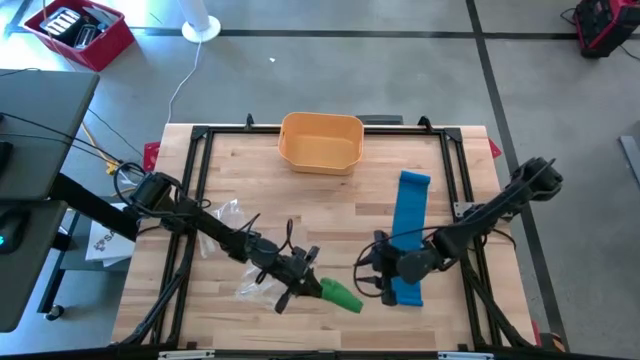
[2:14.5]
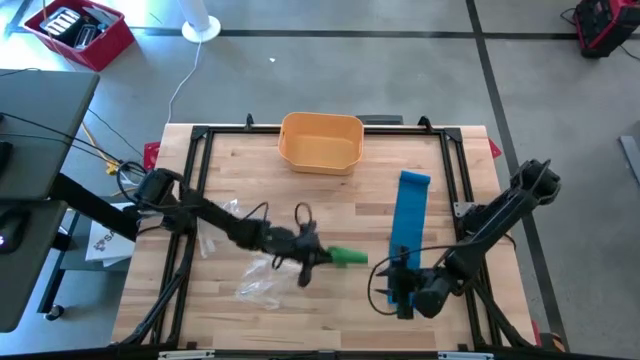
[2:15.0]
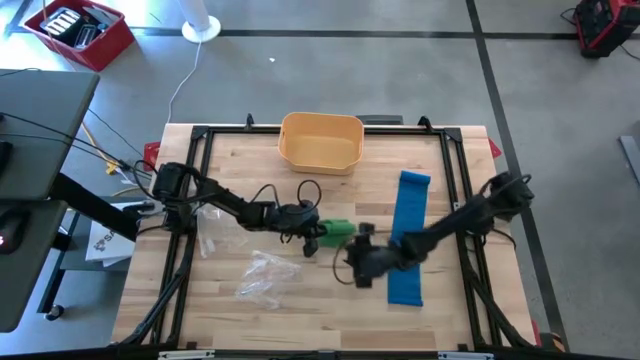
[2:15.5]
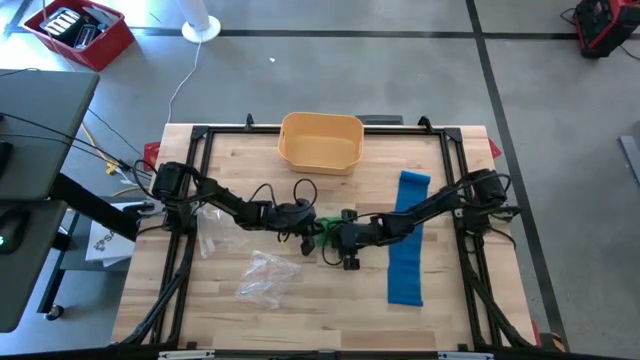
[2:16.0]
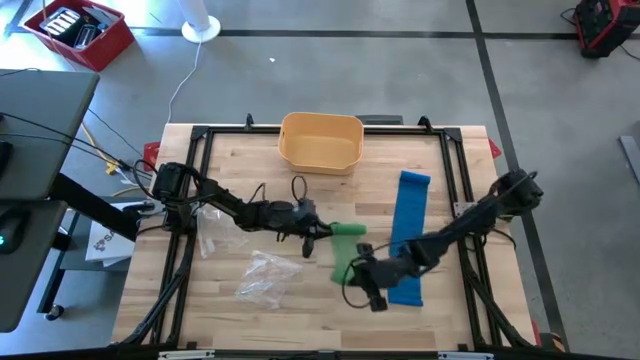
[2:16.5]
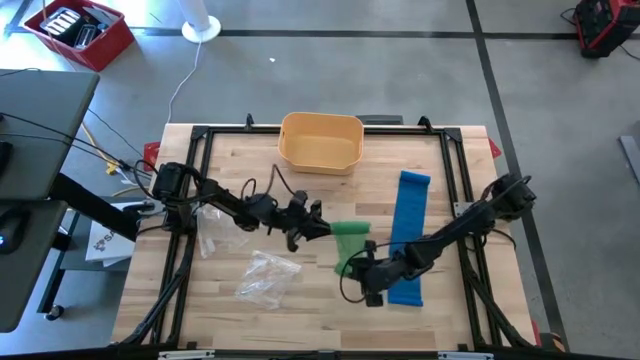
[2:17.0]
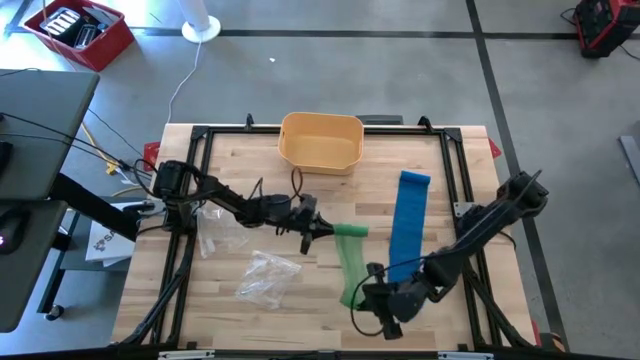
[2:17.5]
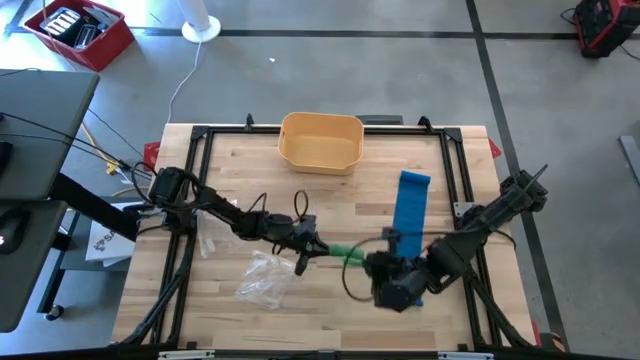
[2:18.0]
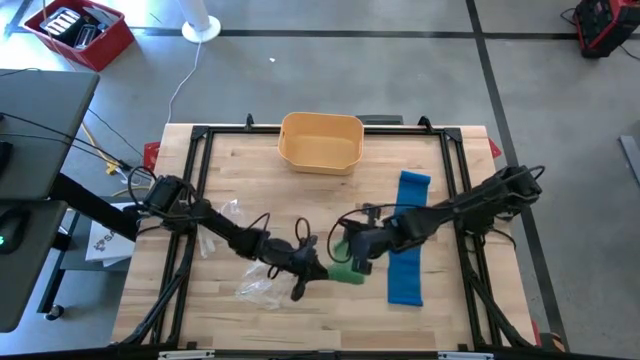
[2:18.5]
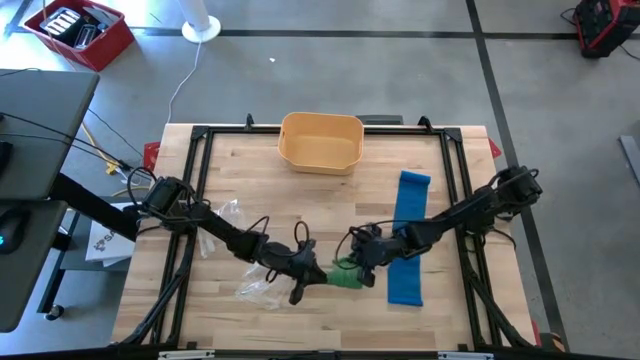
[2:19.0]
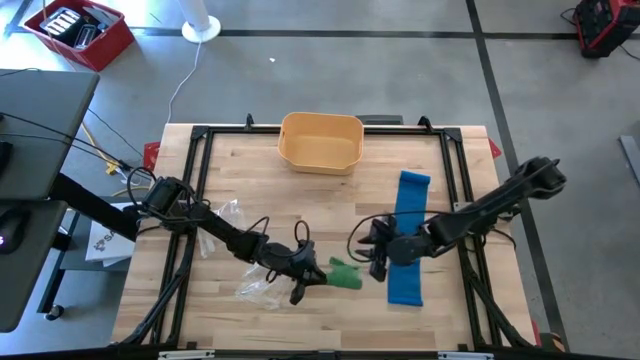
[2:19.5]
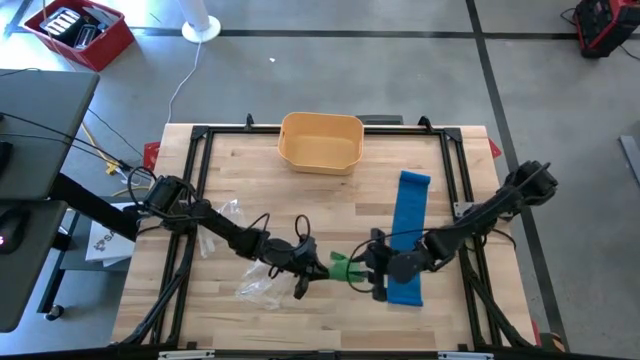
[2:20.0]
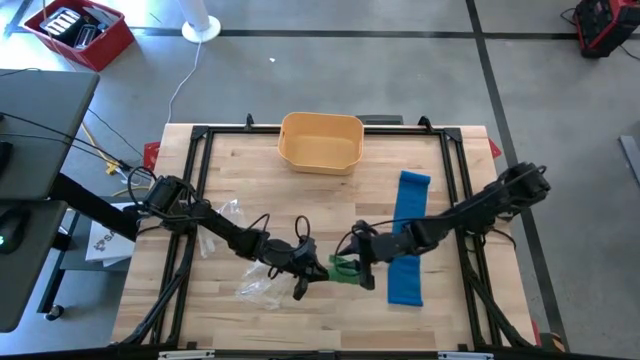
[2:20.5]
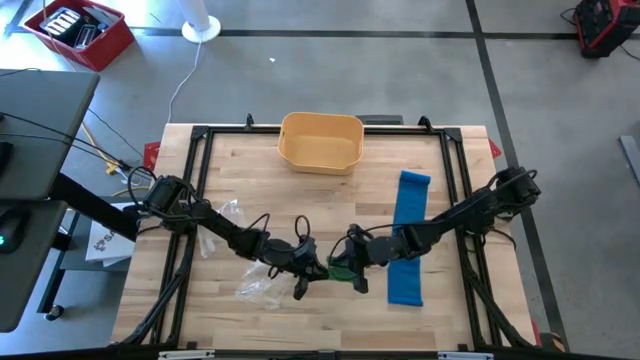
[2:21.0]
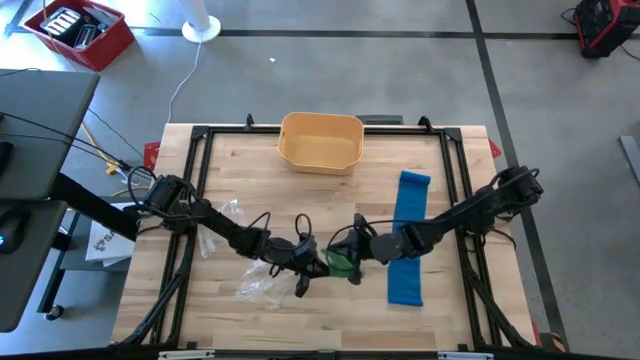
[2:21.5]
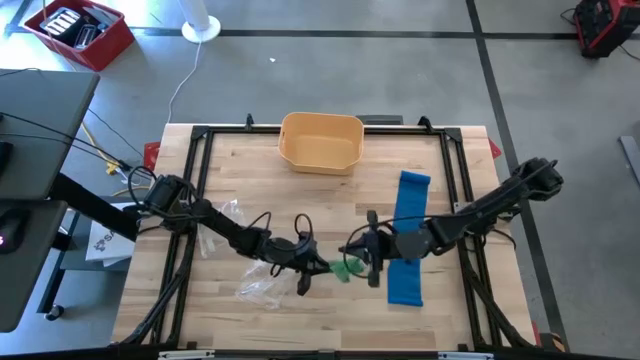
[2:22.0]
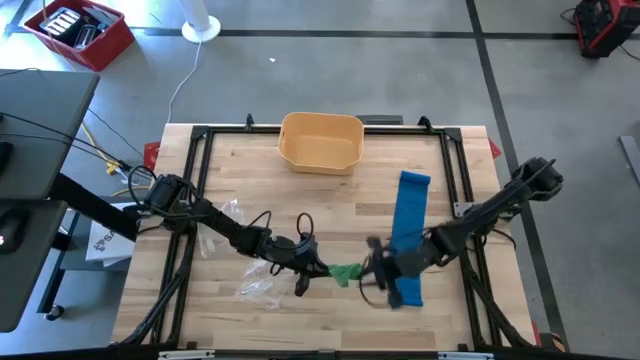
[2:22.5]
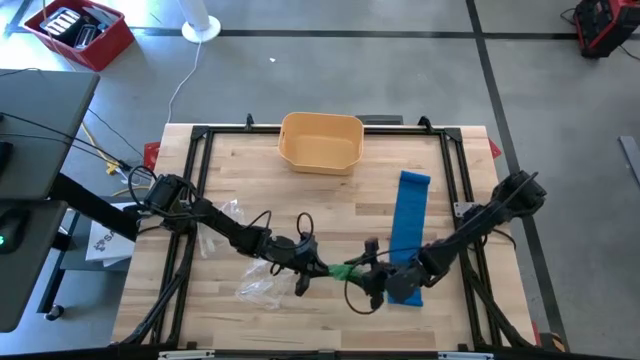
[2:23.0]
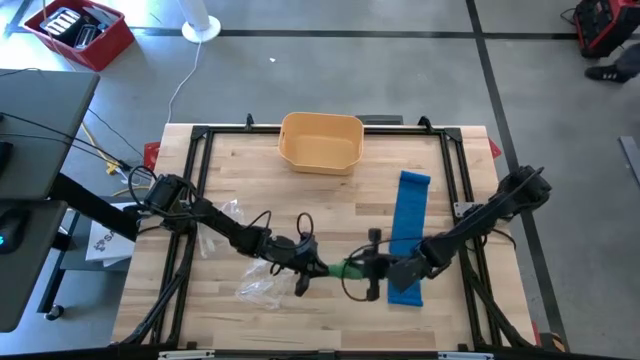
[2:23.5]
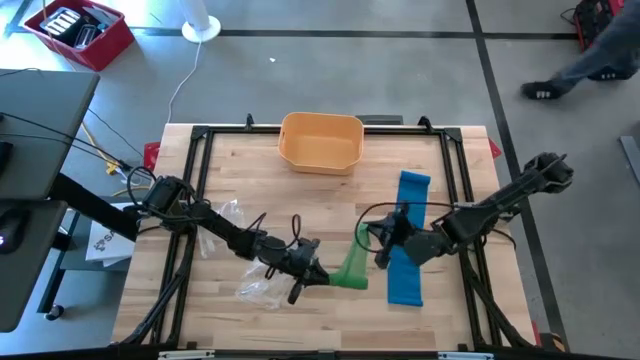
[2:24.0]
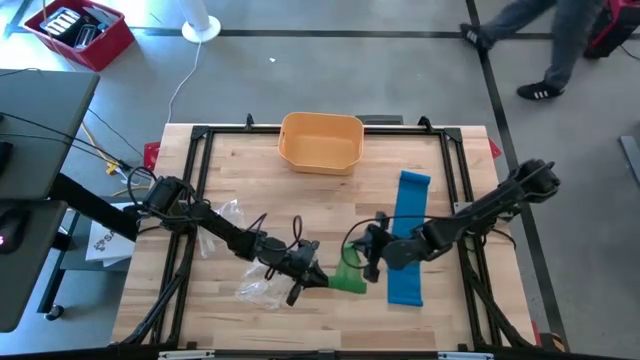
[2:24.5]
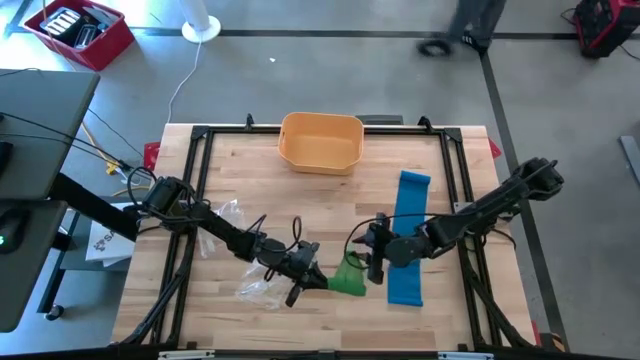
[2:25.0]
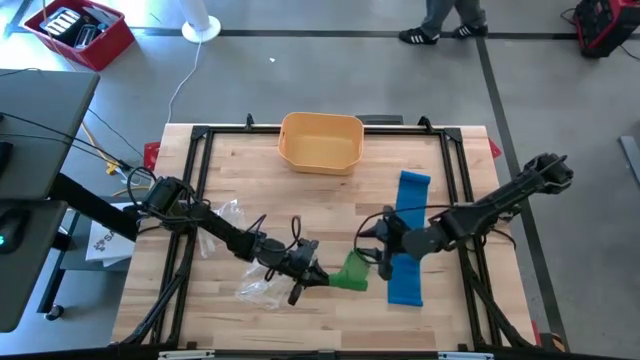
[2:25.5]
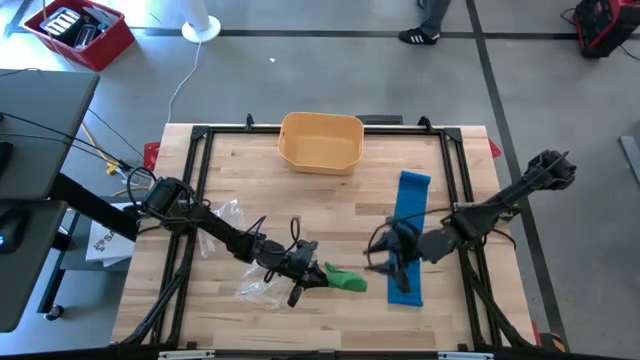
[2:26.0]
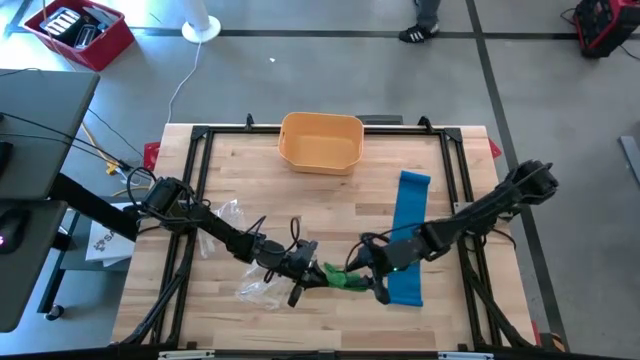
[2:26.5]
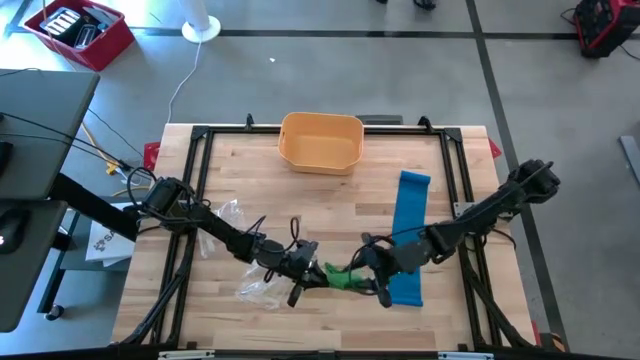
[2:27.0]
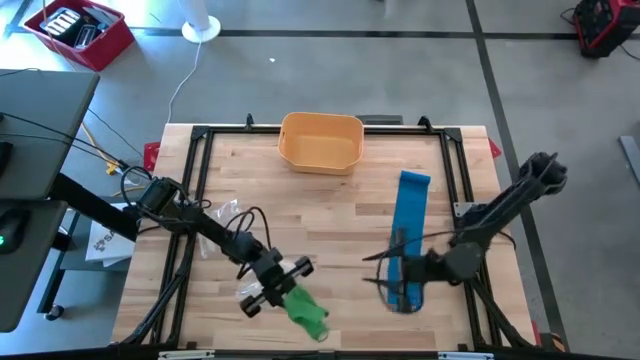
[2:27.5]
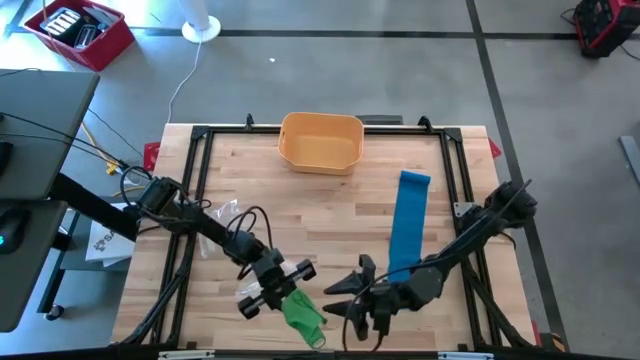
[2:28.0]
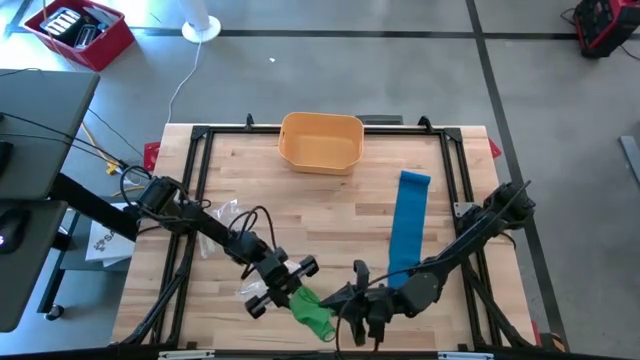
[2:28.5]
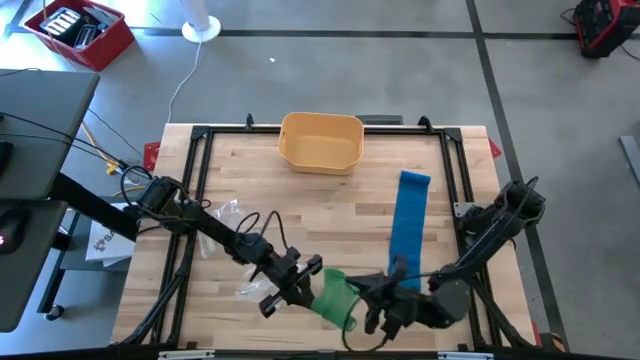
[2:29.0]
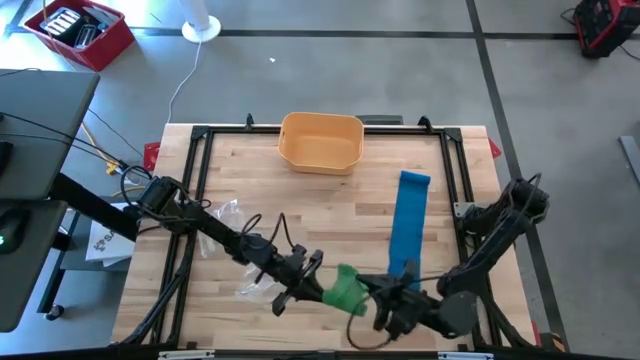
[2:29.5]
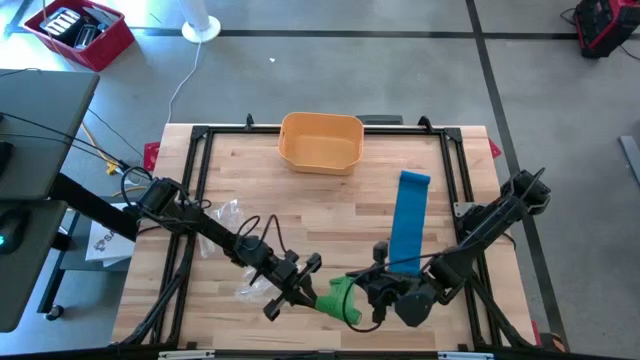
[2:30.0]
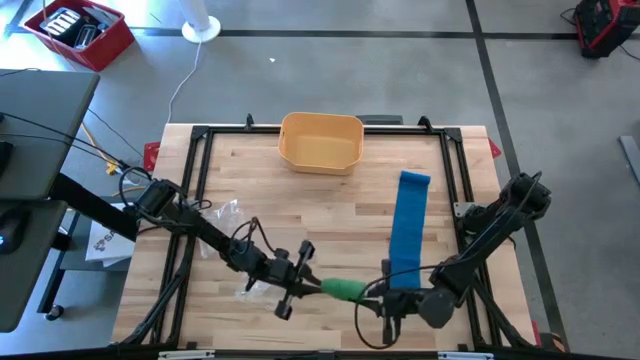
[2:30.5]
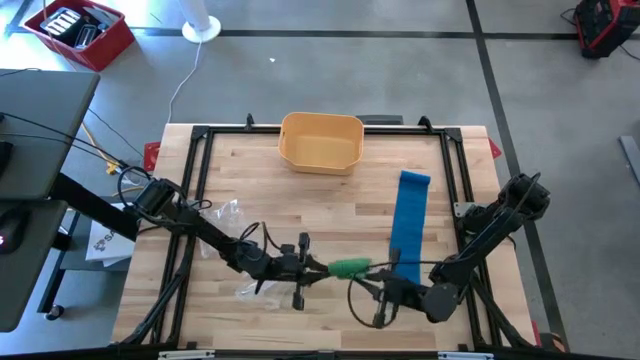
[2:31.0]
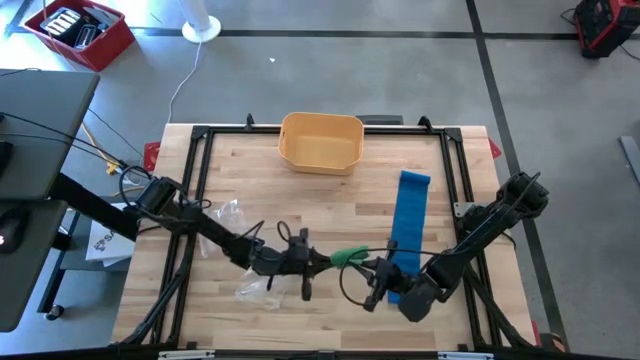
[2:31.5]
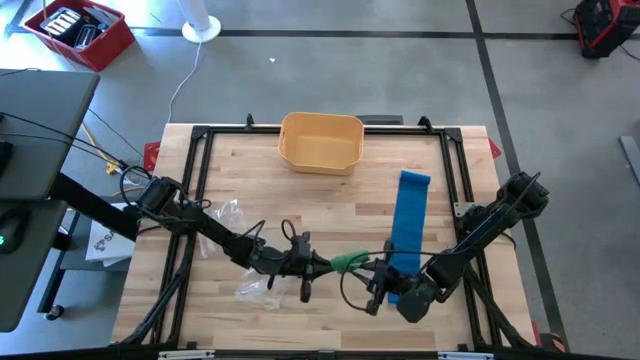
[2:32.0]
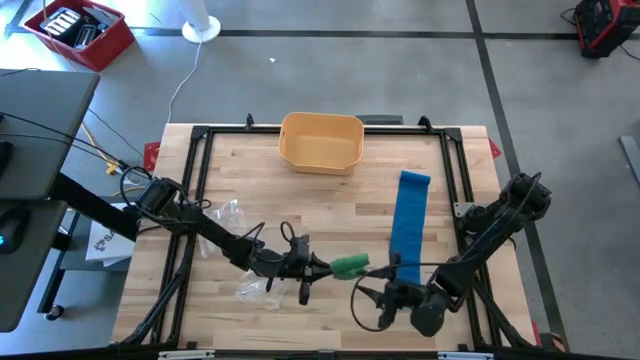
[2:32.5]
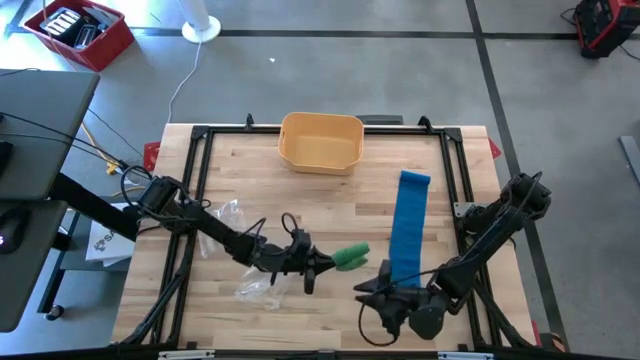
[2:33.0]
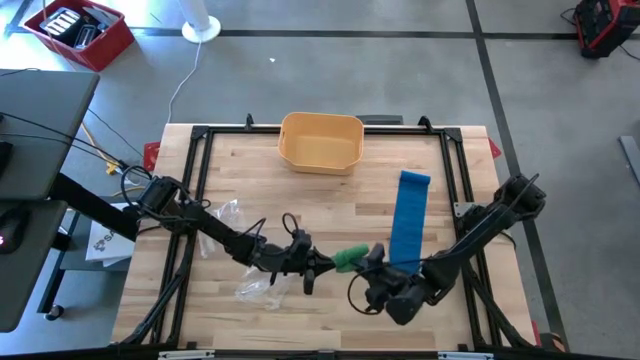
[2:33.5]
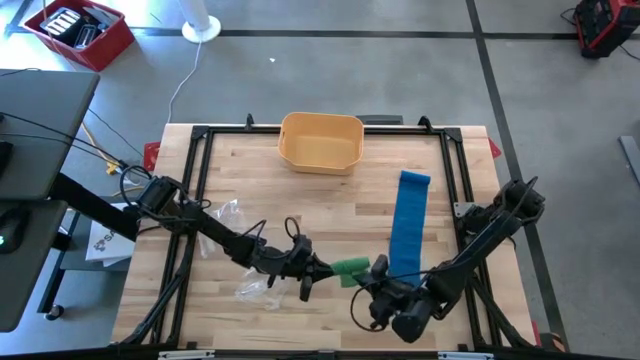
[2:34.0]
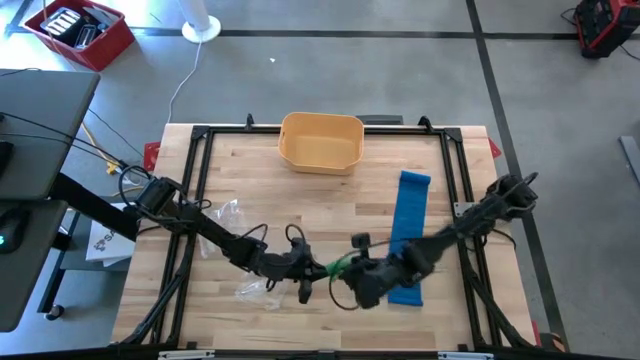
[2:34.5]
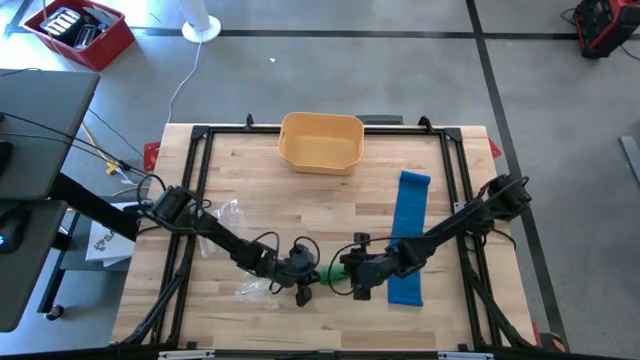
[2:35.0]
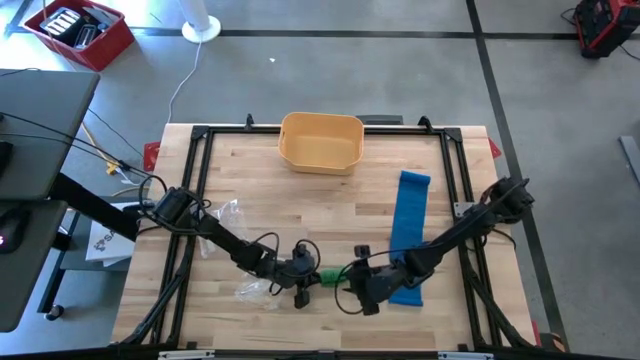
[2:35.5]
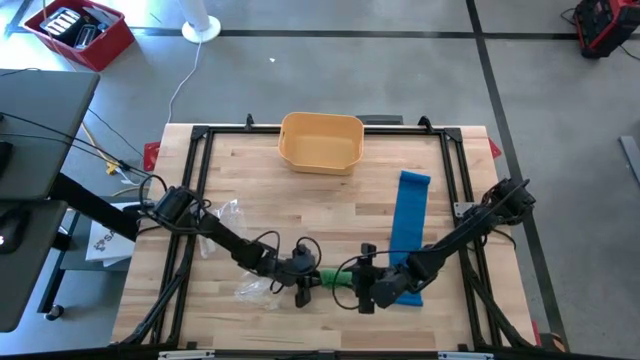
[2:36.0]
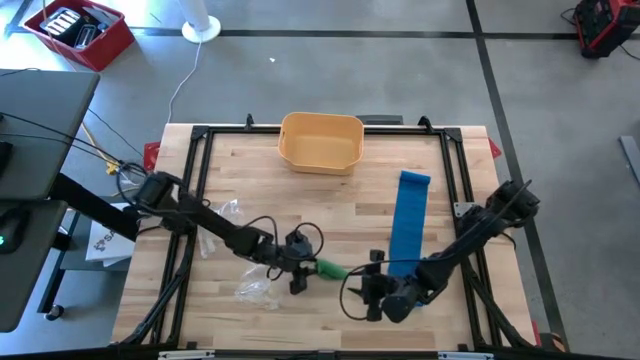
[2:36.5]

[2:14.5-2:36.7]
Task: Roll bandage
Roll the green bandage
